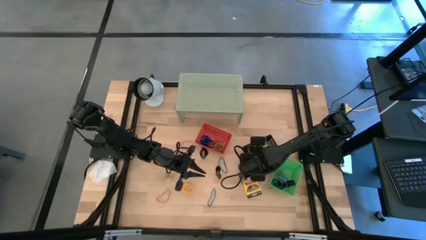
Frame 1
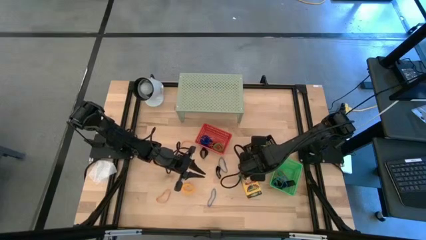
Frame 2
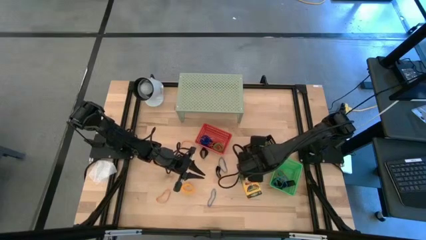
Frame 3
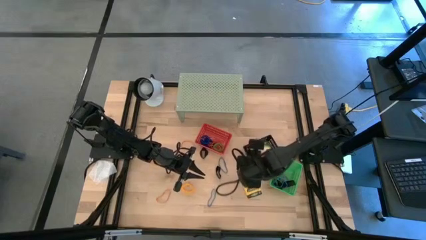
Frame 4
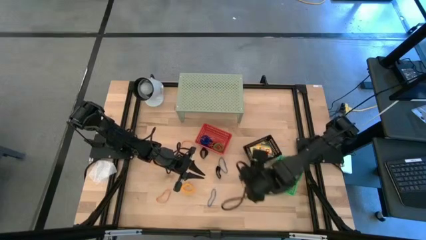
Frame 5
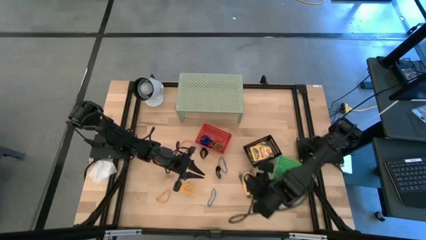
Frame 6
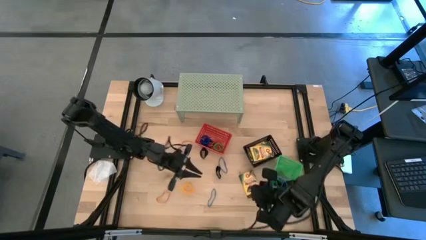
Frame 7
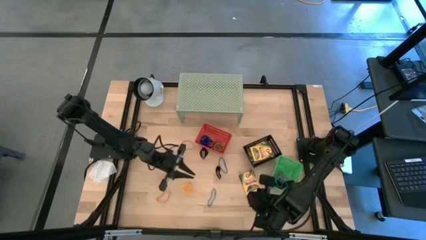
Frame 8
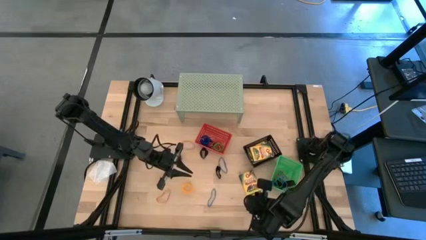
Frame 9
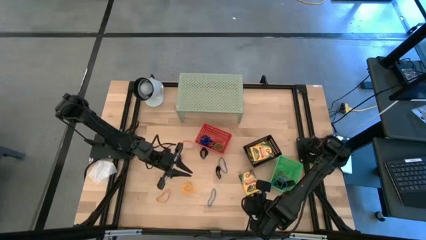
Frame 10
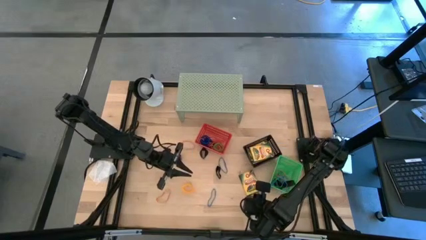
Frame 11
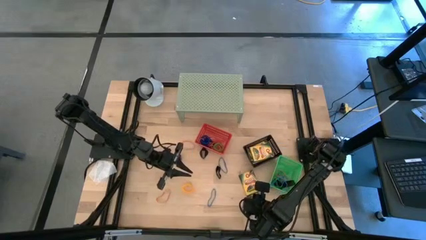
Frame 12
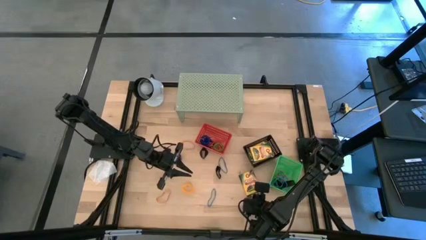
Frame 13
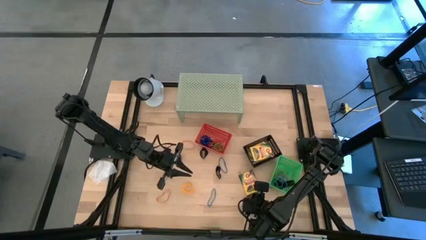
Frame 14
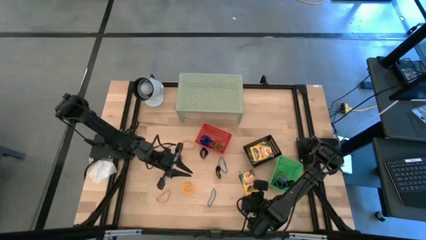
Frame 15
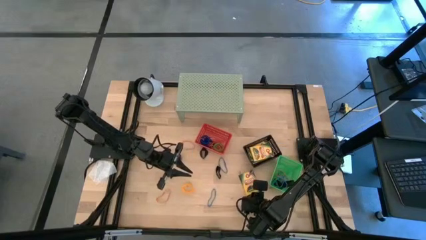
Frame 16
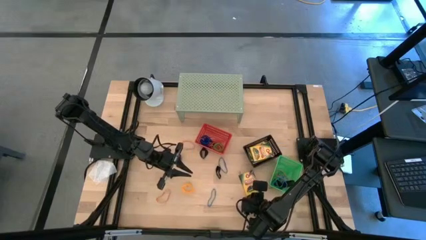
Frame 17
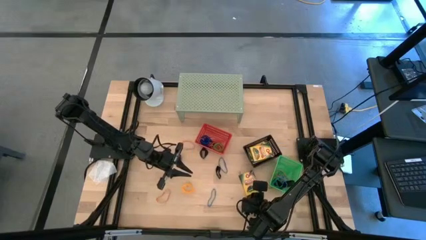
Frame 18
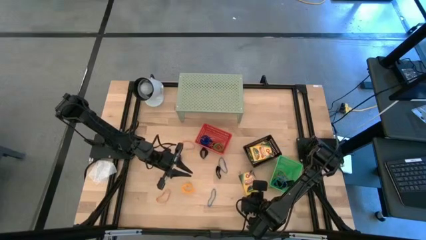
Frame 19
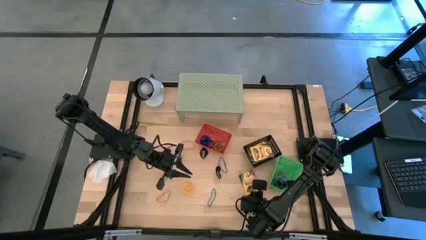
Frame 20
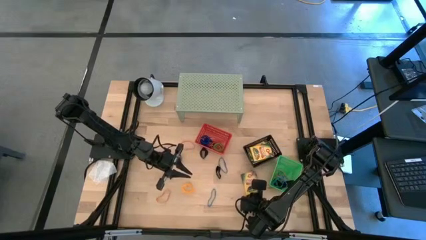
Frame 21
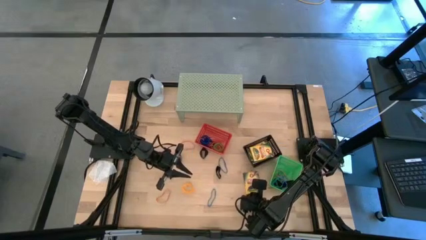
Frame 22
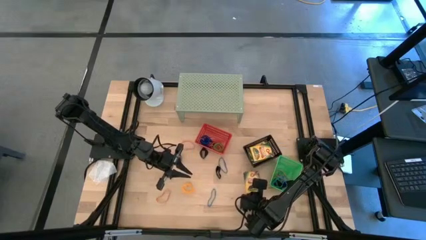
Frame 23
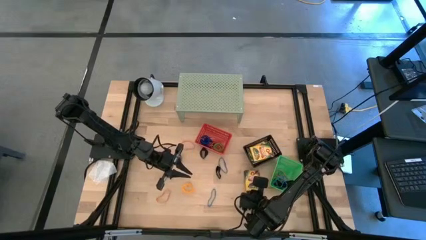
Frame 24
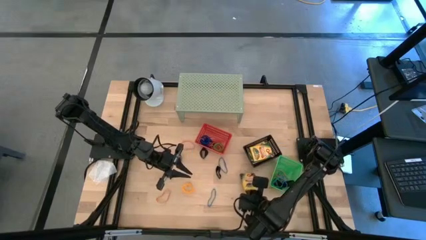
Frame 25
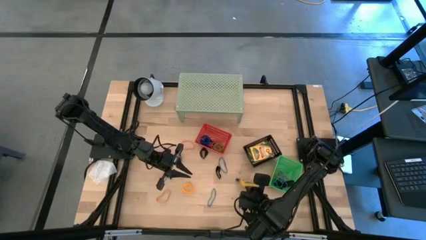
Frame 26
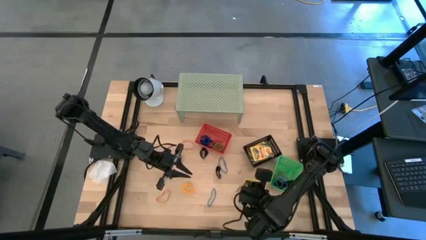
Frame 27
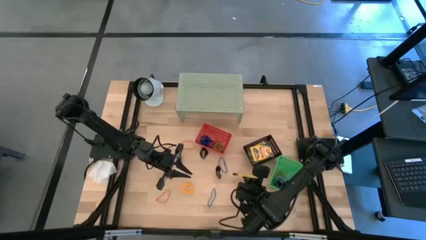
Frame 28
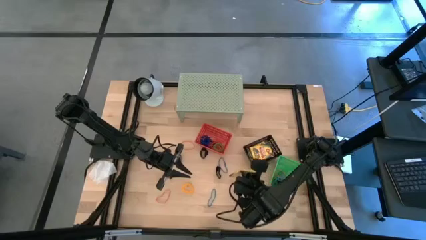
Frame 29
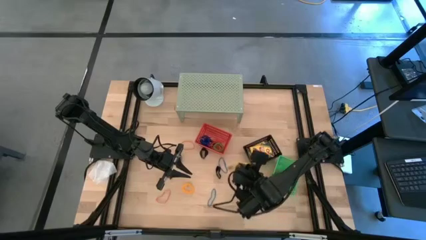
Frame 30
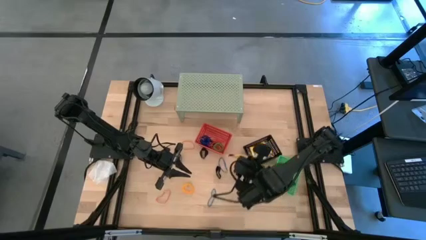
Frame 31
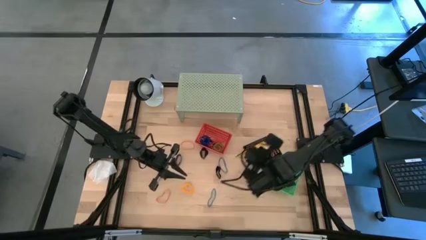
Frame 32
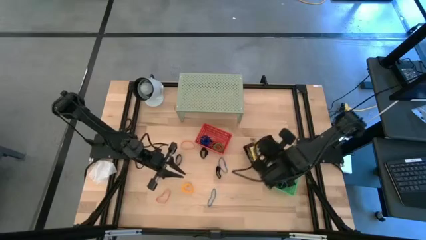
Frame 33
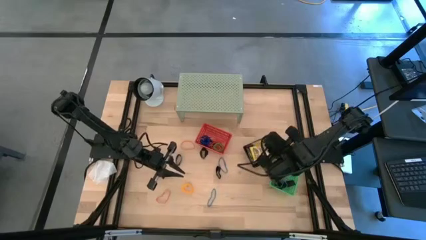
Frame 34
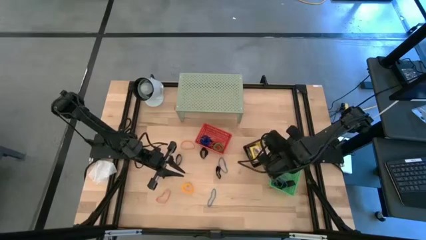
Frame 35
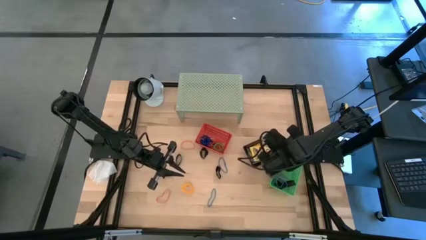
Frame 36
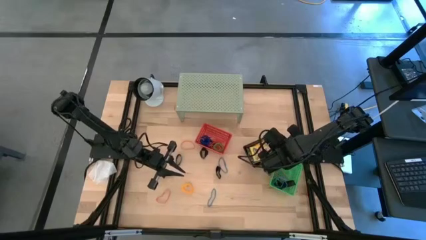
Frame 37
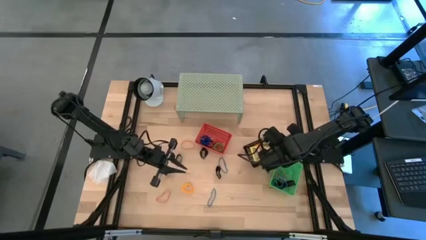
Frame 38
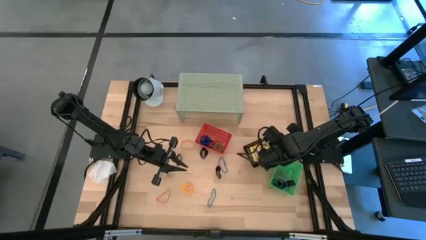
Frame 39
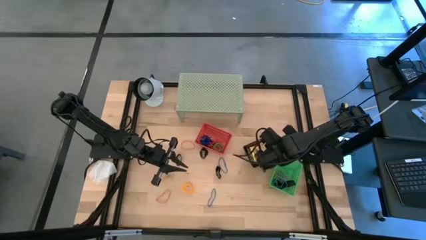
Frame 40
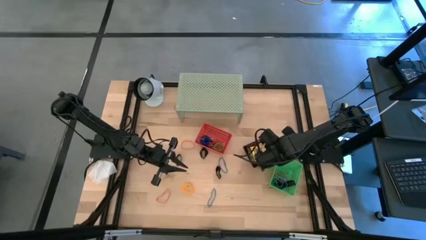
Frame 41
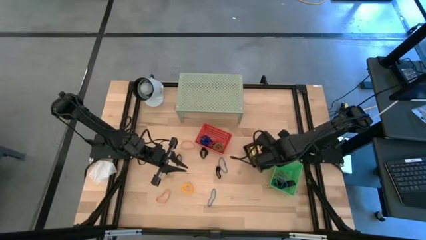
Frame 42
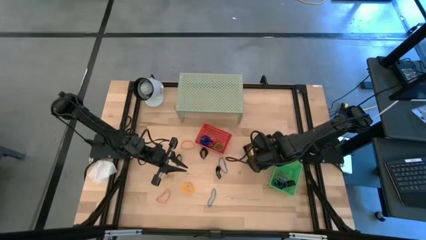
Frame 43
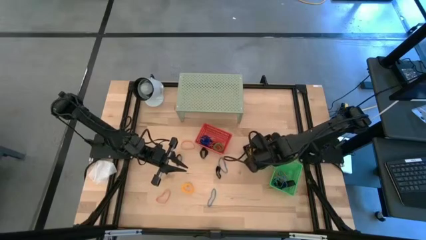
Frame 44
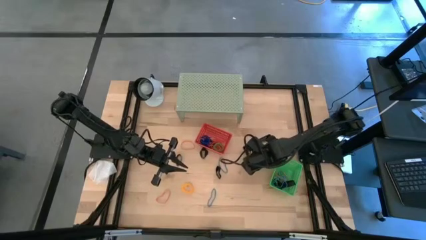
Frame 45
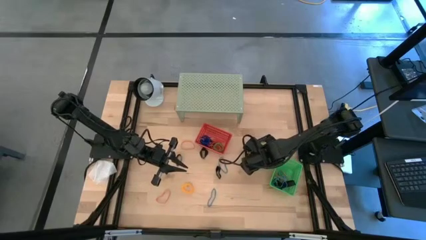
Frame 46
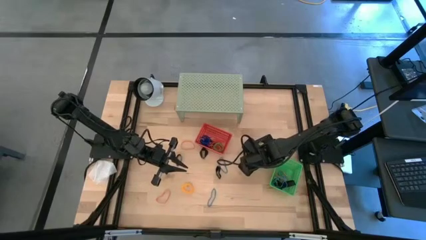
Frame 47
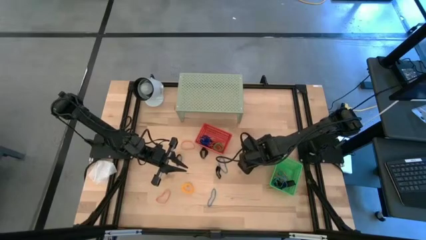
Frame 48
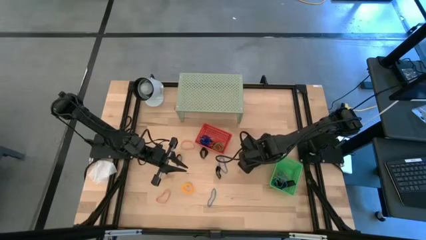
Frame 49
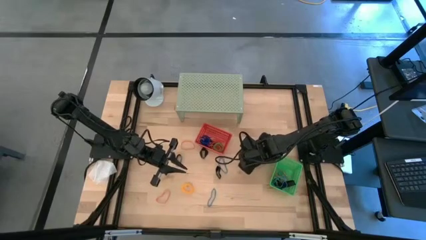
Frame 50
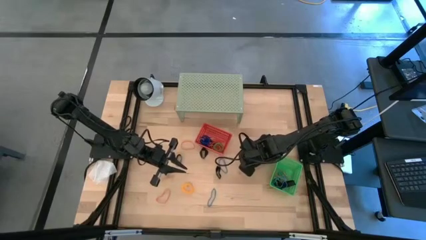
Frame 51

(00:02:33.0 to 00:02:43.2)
Task: Pick & Place Office Desk Supplies
Put the crayon box into the black bin

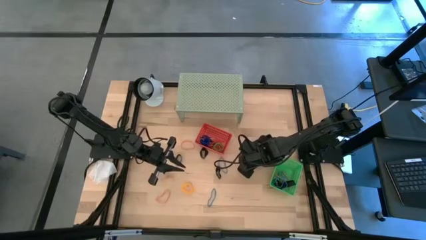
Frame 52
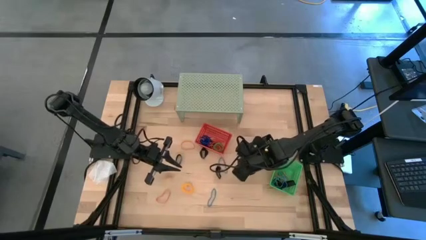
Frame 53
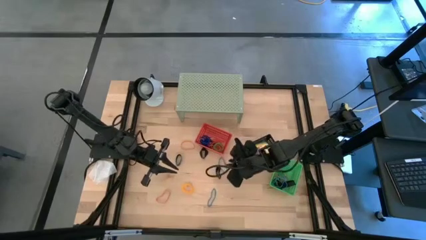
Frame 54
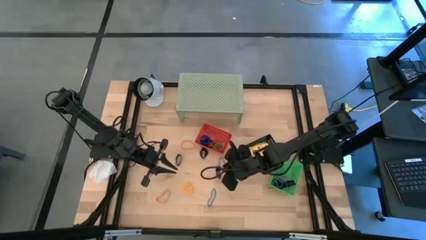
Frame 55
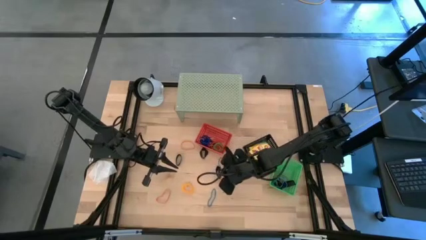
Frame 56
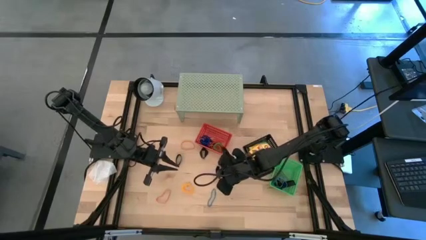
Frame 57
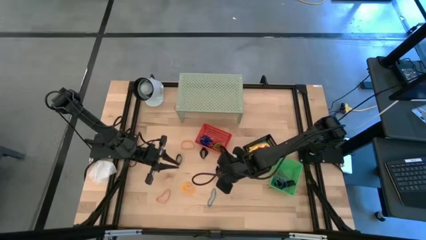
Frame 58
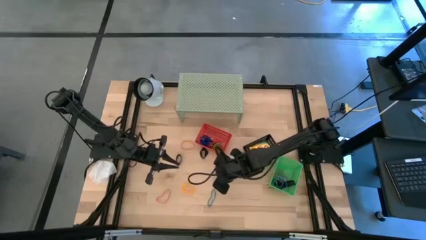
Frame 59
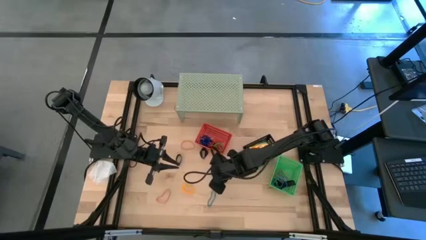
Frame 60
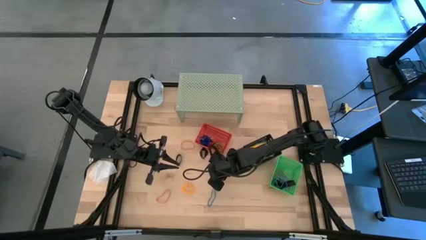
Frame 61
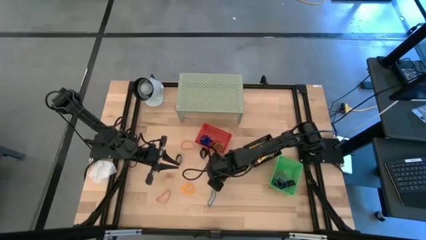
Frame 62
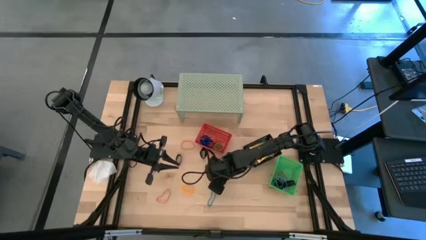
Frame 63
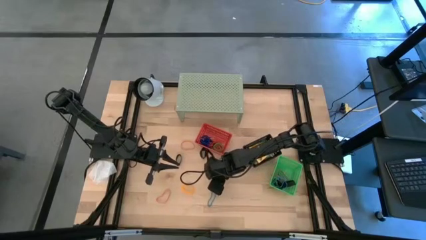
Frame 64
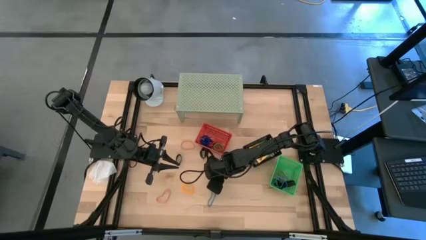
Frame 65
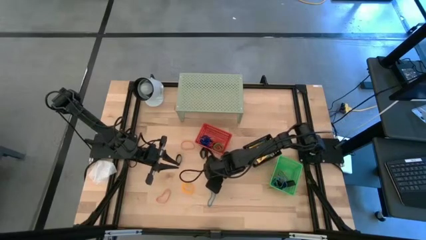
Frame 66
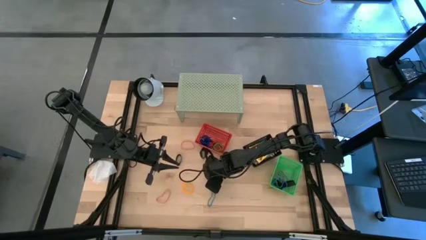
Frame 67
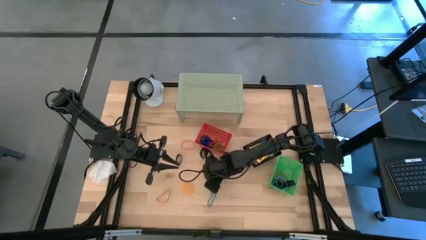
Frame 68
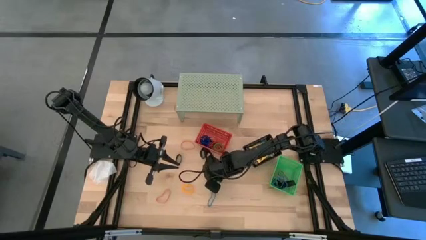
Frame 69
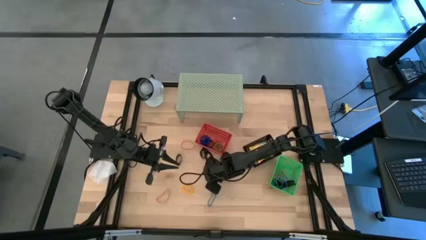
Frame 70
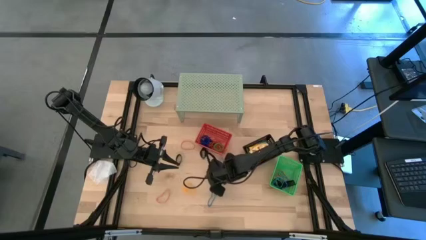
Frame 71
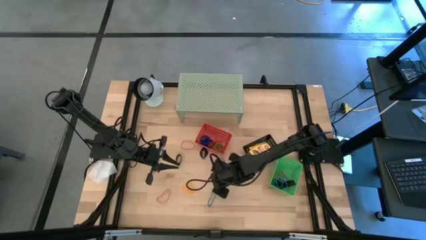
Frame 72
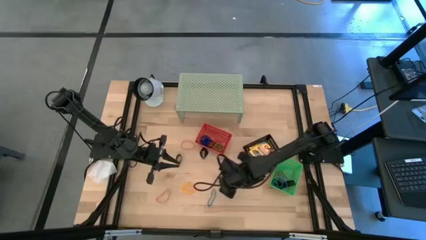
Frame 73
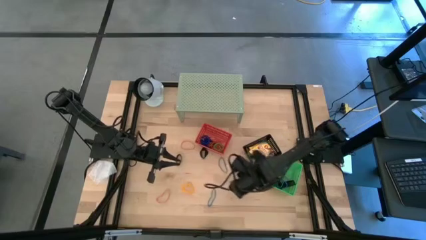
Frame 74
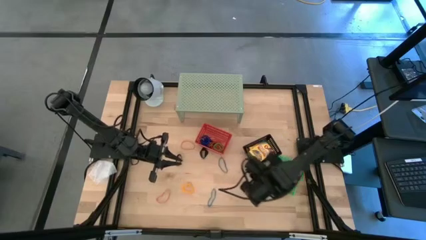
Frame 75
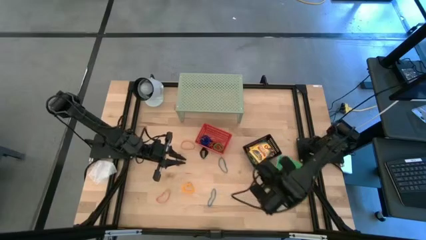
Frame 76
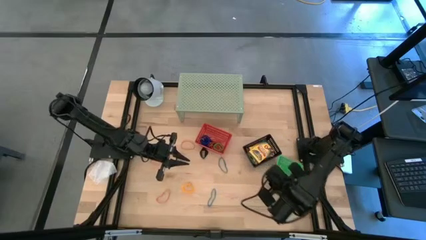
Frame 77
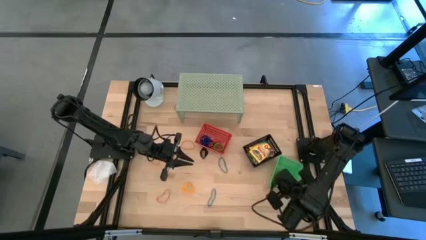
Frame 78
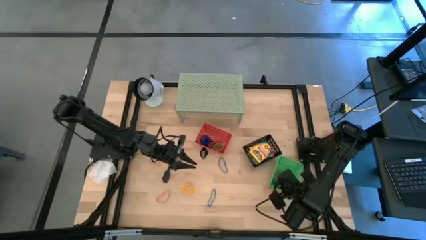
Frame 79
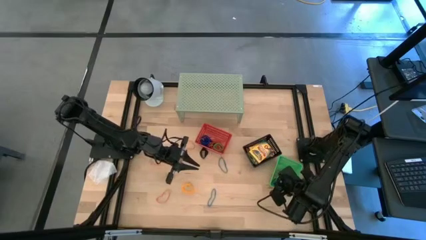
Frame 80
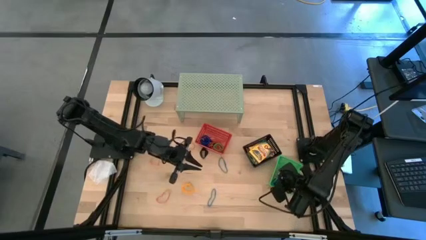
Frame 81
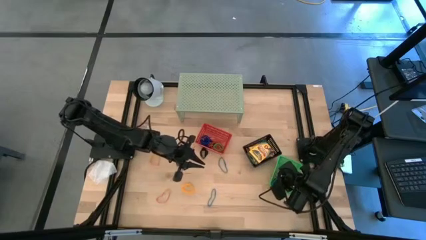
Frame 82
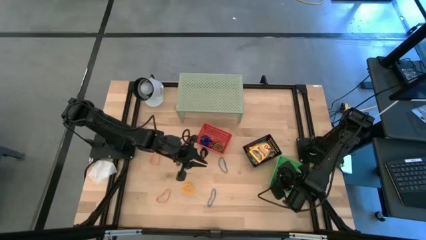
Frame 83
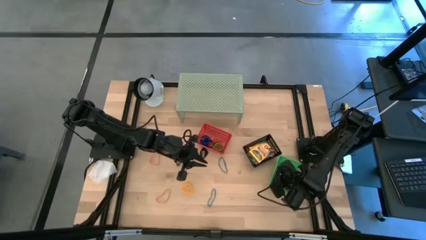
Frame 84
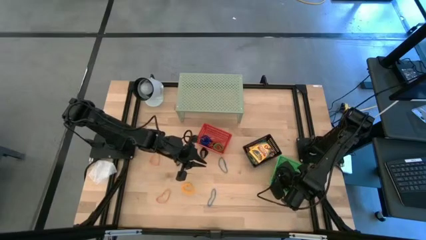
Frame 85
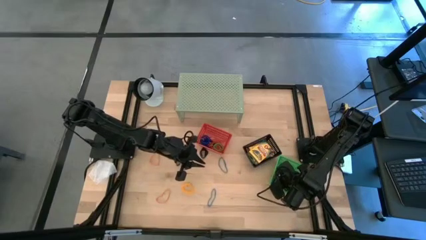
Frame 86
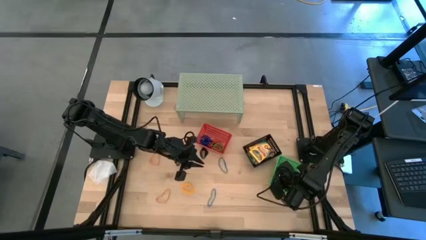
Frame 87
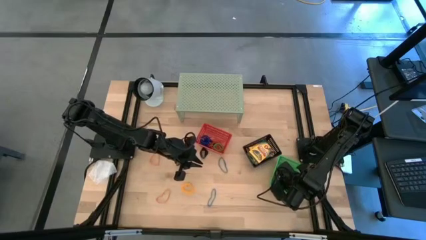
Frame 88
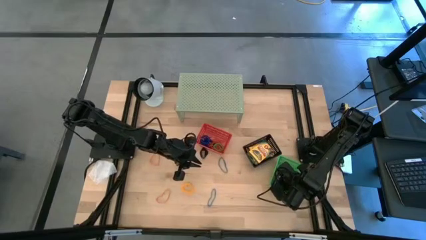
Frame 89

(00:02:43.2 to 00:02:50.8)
Put the black rubber band into the green bin
